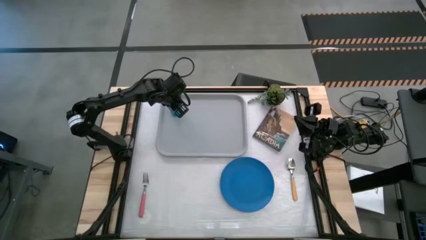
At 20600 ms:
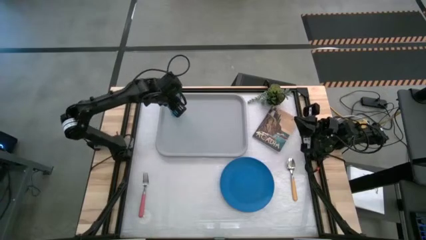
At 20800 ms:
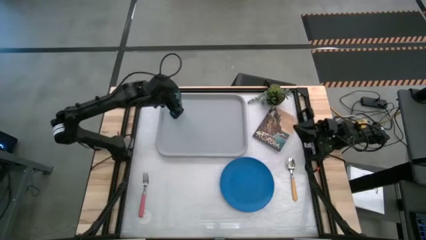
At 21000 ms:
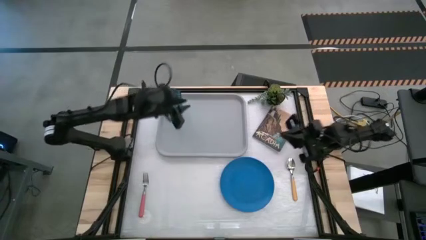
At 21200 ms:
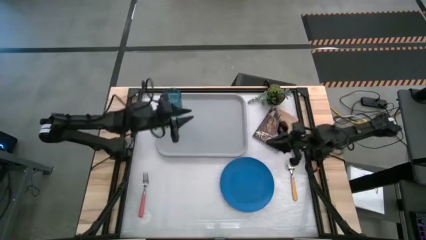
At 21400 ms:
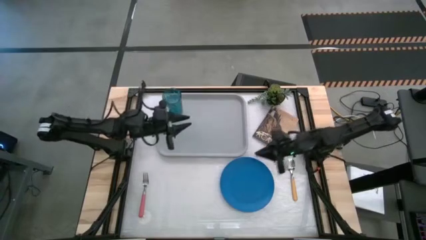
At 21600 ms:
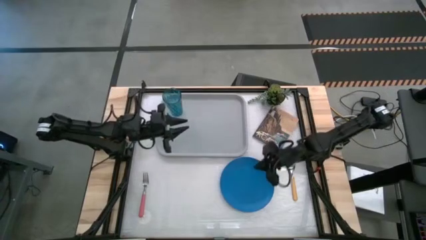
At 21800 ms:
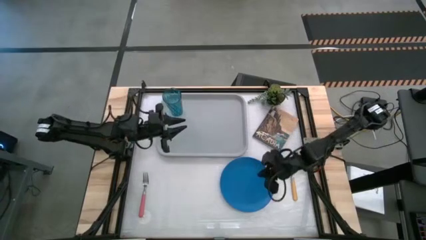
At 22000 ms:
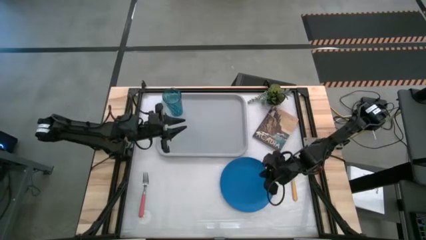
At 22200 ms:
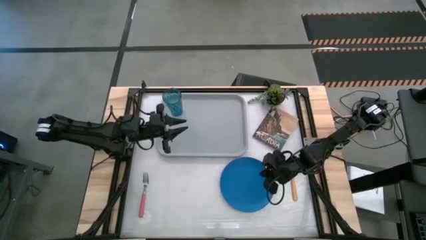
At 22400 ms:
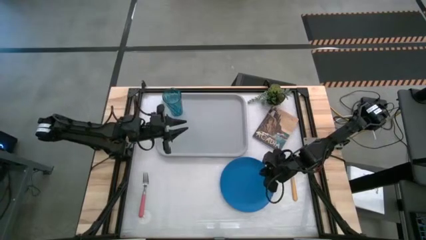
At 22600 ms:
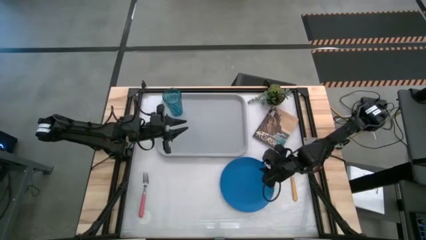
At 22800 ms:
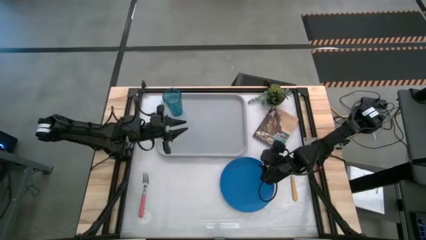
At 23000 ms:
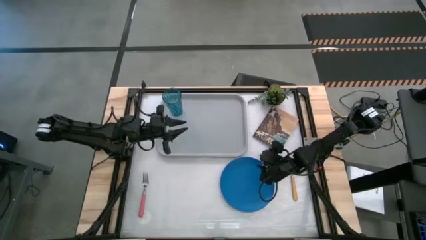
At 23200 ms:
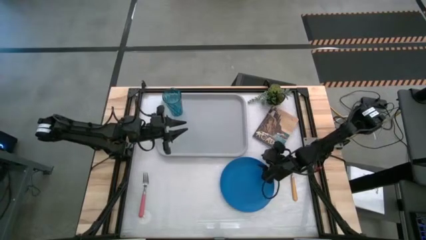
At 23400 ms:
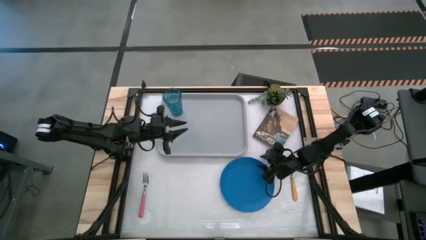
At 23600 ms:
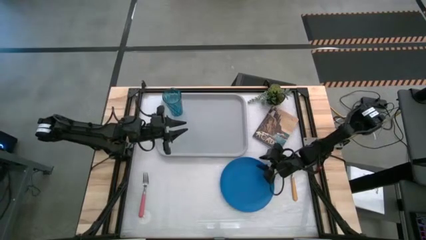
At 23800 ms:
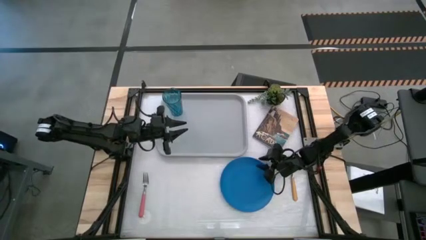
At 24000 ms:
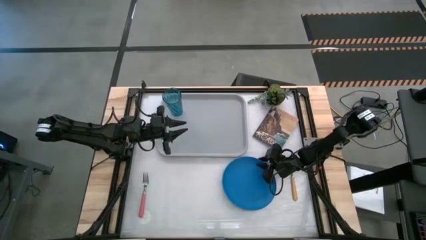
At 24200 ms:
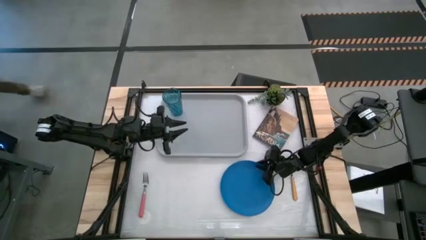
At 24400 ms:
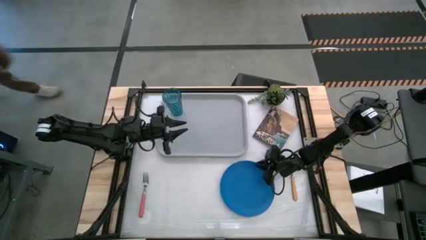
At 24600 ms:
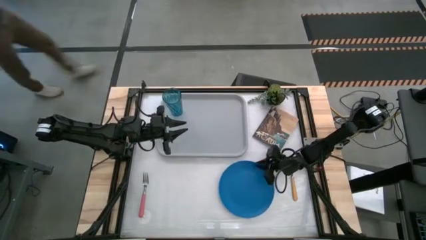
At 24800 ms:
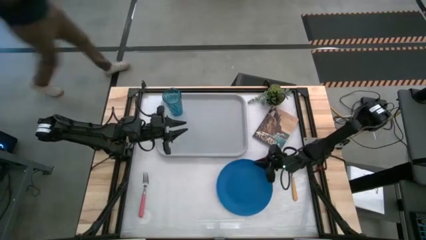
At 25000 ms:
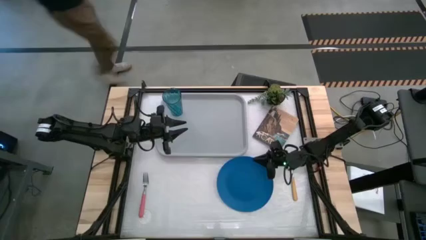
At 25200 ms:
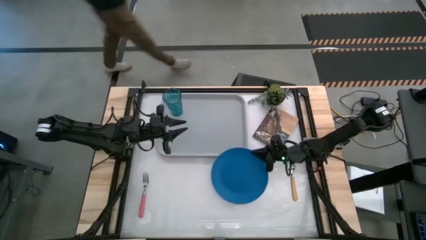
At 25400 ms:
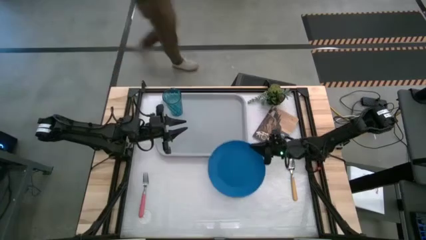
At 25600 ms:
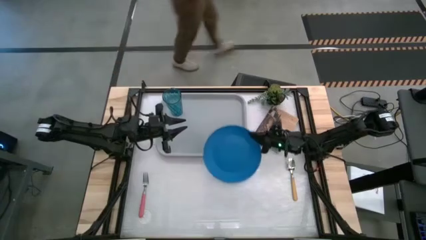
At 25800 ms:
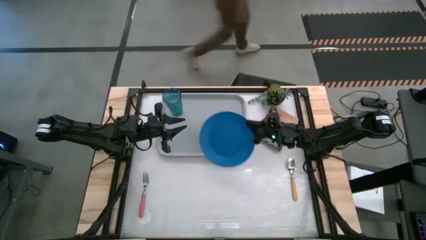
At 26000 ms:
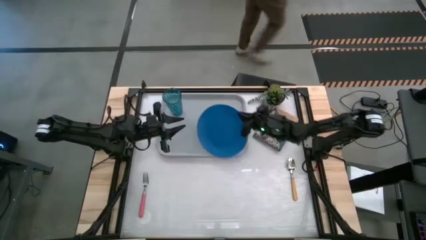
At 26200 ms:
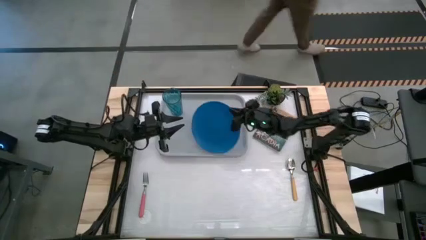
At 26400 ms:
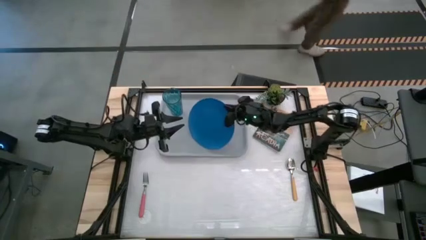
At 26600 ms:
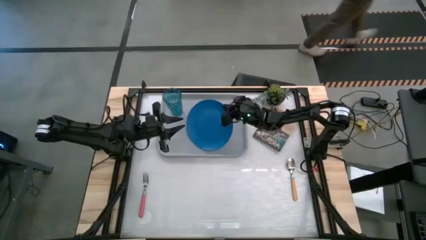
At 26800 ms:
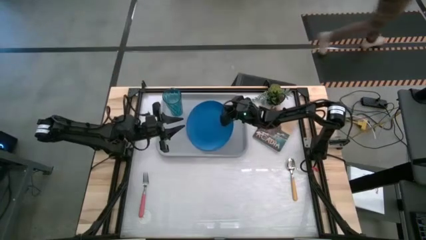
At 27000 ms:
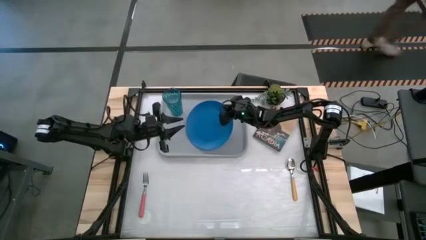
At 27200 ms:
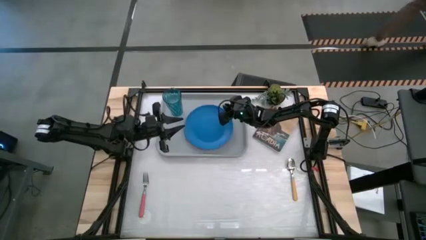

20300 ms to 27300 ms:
Task: Pick and place plate/cup/fork/spoon on tray
Put the blue plate on the center of the gray tray

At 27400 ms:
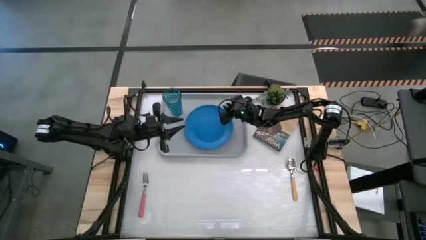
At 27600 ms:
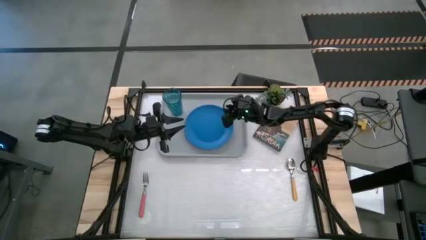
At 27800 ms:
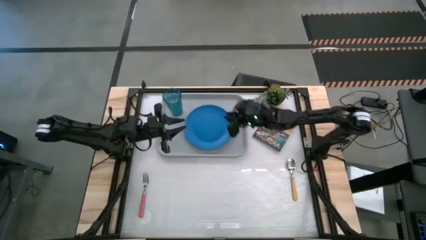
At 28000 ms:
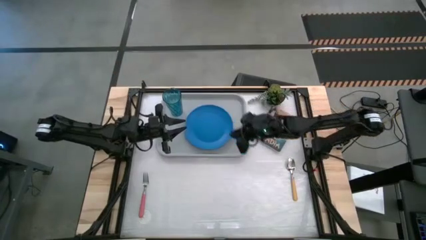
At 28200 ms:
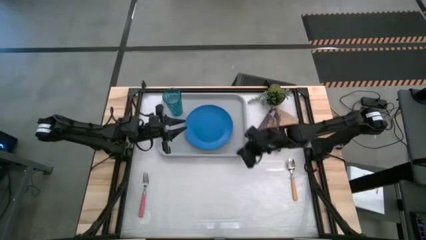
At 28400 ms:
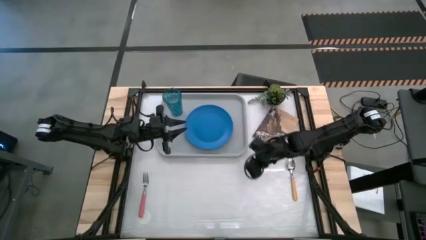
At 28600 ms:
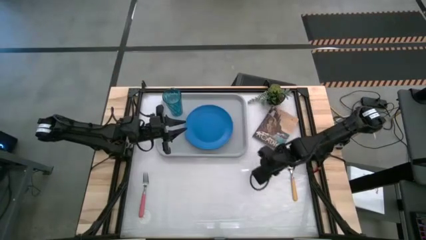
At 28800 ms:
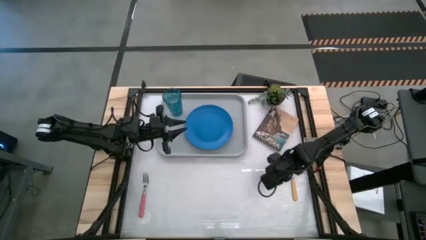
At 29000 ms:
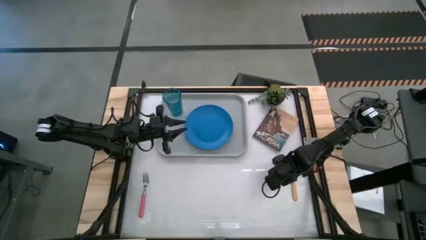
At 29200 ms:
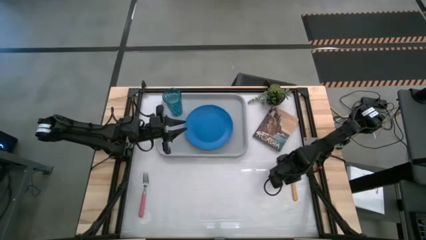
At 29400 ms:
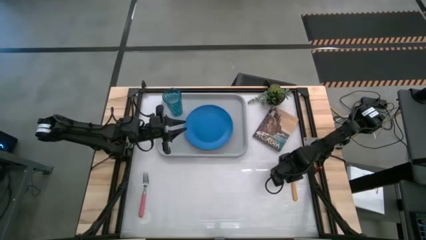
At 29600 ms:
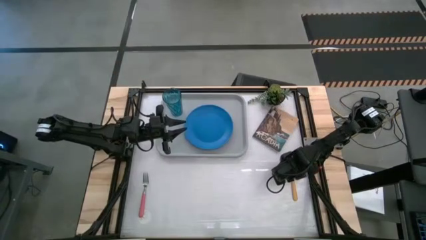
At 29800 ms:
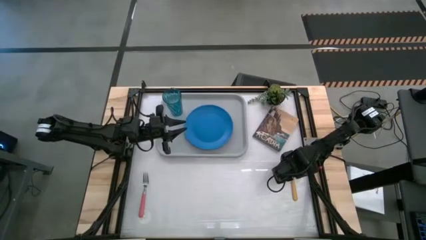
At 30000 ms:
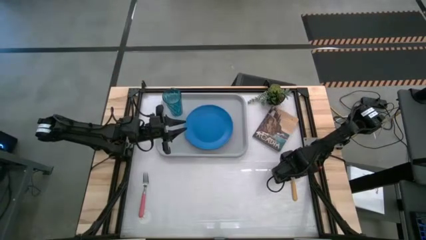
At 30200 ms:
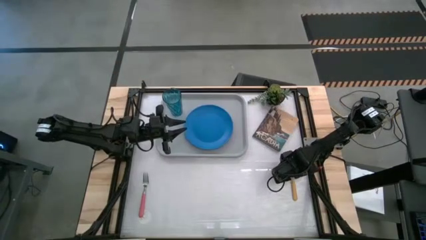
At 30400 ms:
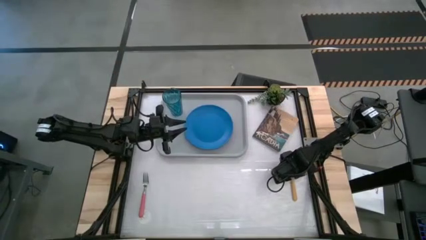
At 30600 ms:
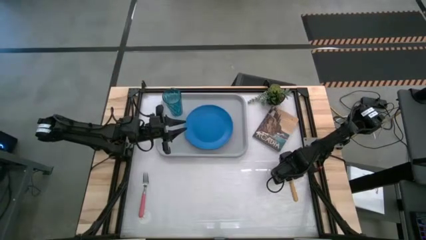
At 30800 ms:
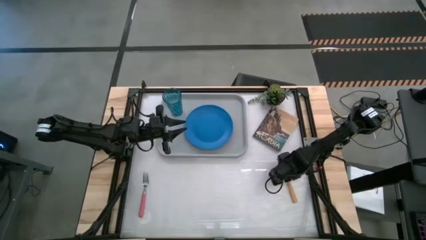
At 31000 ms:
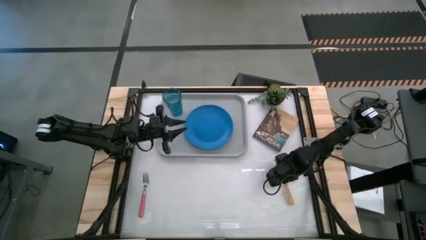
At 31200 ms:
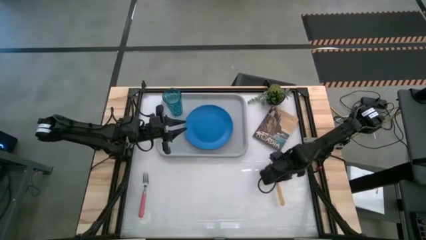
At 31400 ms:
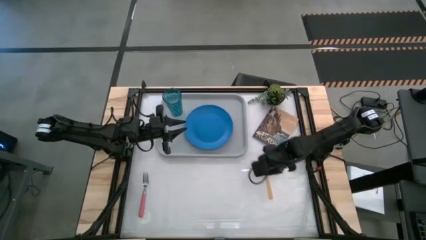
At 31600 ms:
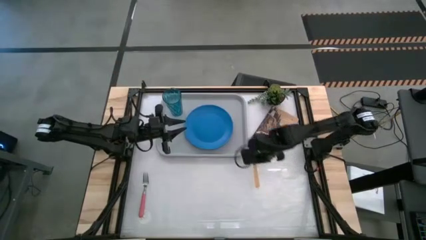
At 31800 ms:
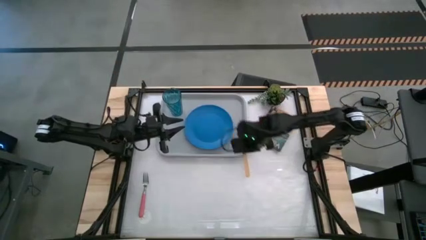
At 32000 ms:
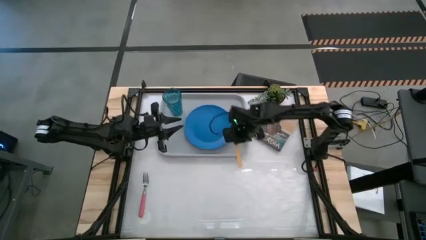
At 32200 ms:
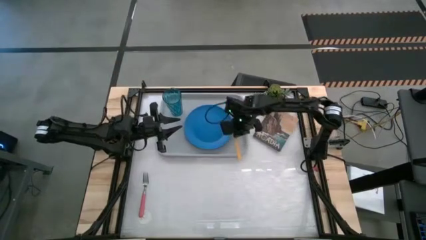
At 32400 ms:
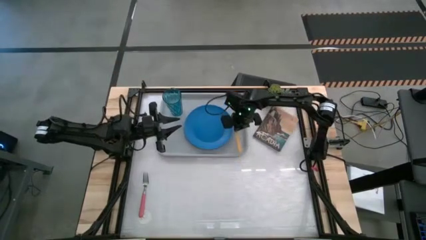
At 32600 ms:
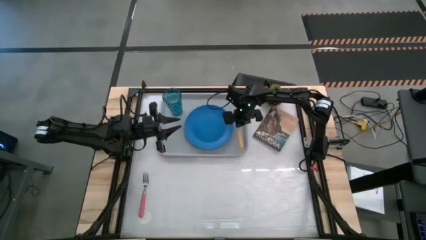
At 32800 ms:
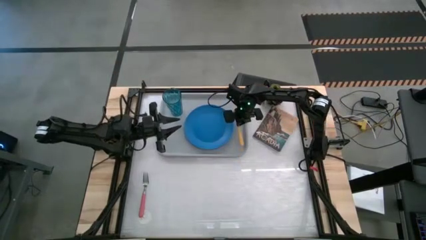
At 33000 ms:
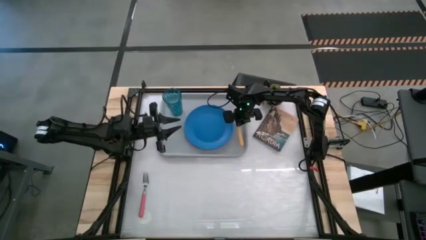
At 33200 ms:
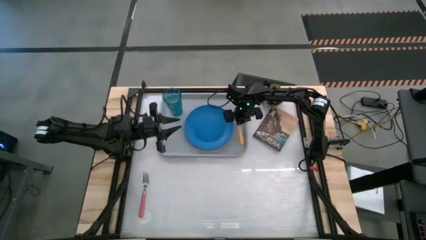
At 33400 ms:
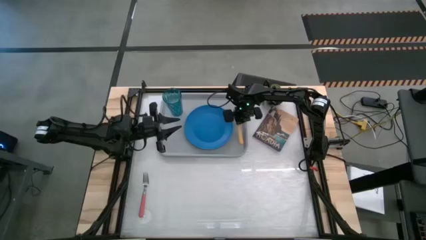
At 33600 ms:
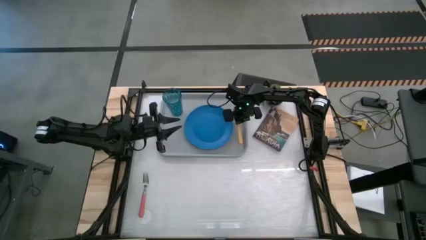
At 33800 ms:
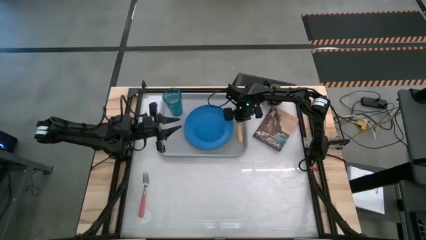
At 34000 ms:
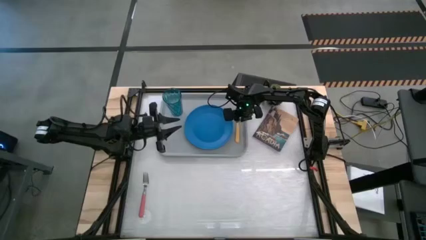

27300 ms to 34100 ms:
Put the yellow spoon to the right side of the blue plate on the gray tray

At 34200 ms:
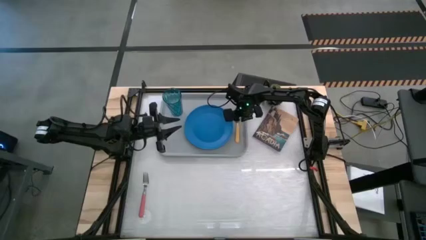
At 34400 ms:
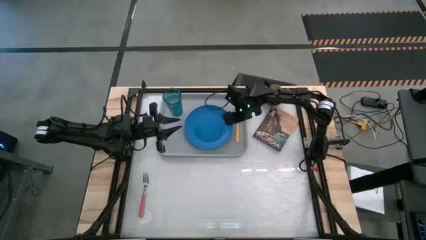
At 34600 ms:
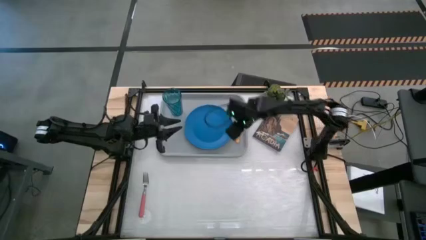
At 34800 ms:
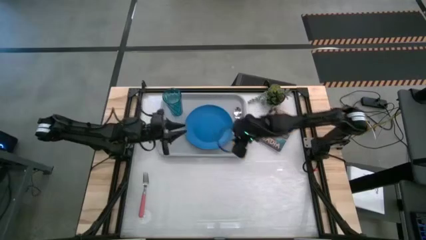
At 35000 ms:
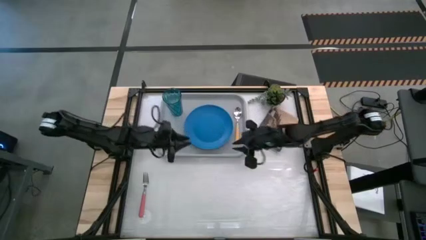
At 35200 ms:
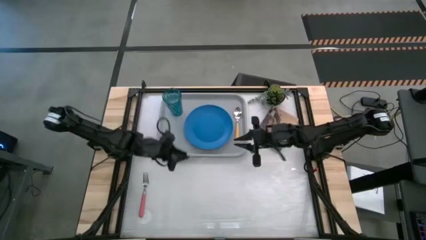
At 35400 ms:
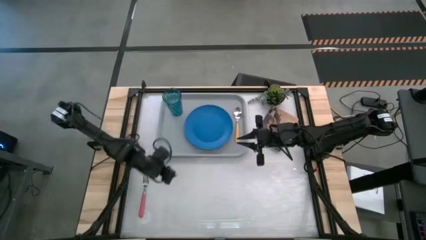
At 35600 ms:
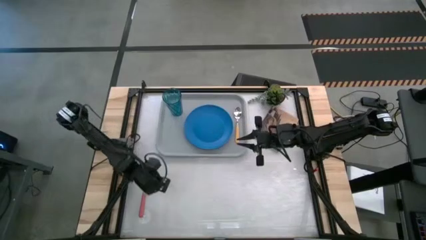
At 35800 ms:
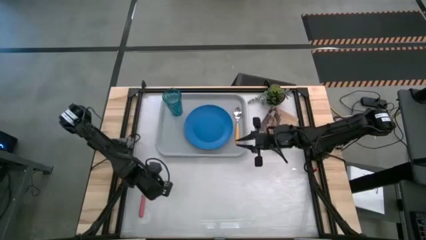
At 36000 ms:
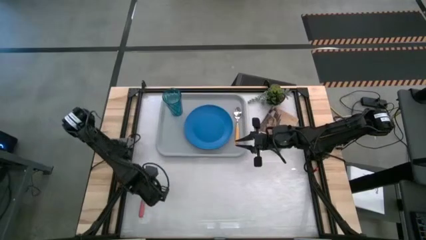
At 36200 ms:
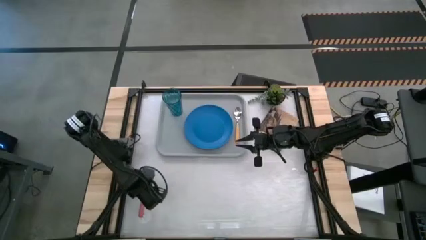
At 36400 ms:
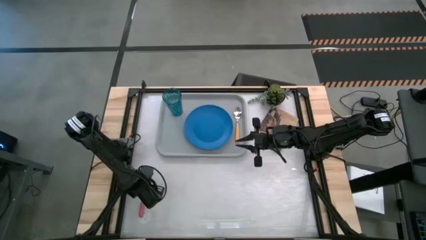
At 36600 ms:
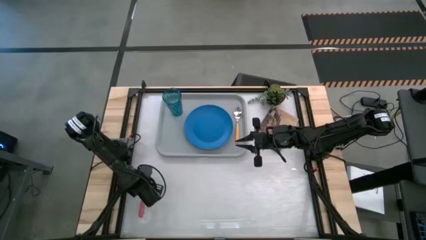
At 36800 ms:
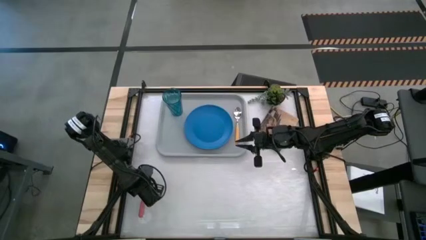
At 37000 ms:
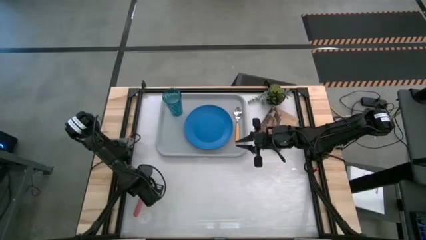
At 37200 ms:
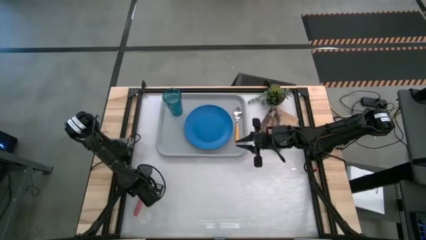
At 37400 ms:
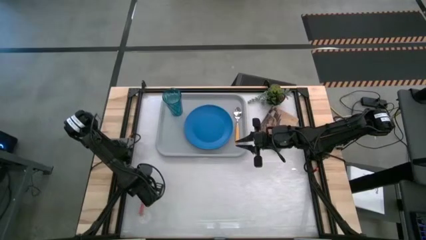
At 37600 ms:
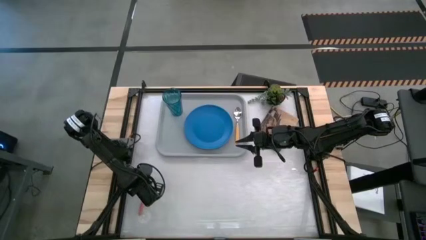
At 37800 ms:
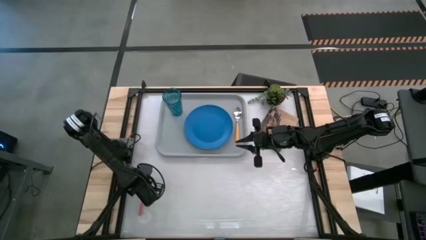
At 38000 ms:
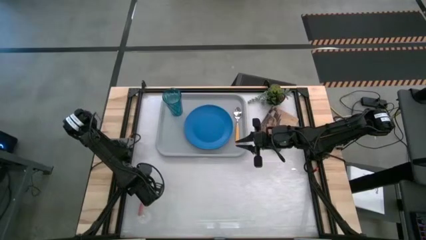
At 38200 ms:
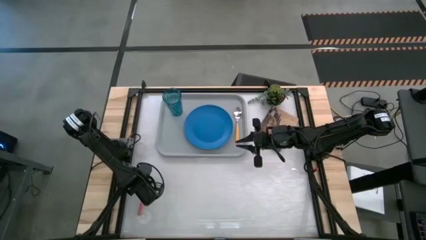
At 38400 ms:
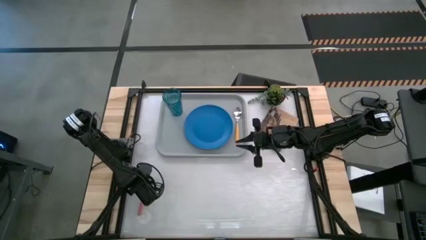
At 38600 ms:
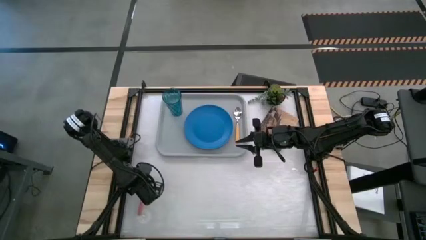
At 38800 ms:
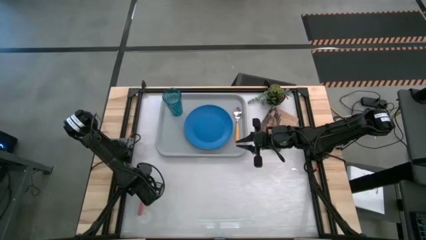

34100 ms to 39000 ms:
Put the pink fork to the left side of the blue plate on the gray tray
